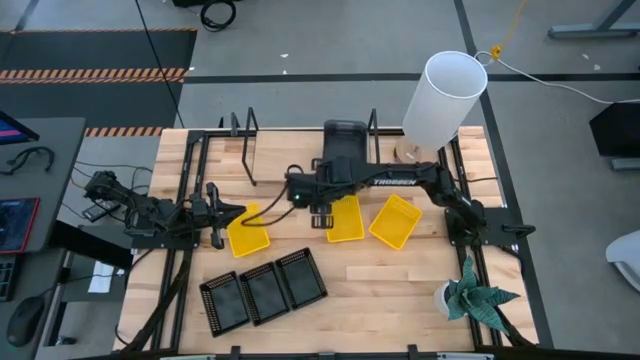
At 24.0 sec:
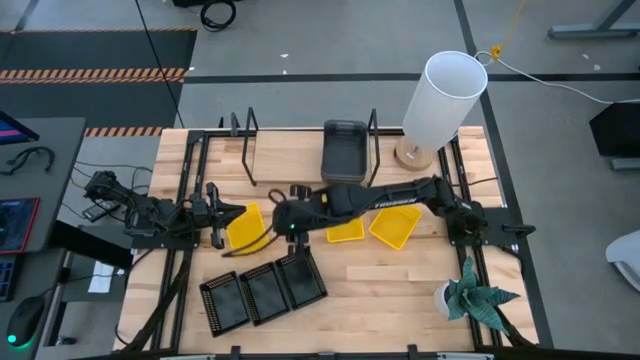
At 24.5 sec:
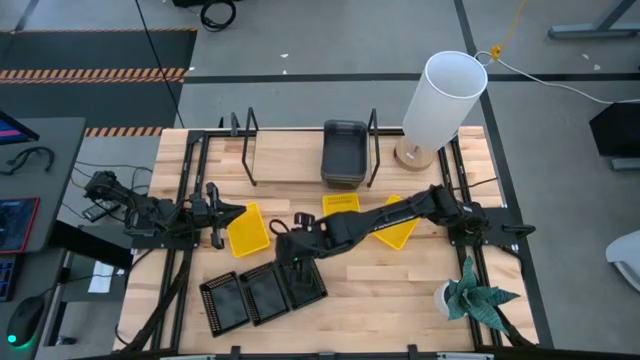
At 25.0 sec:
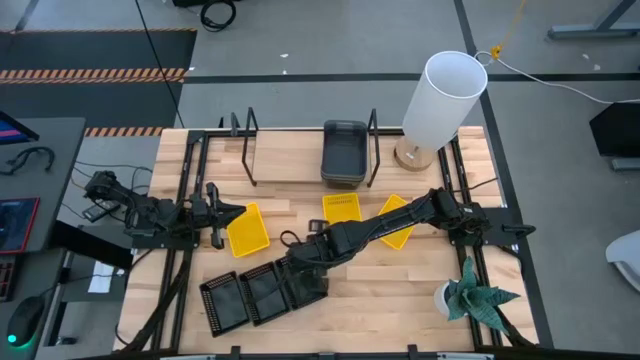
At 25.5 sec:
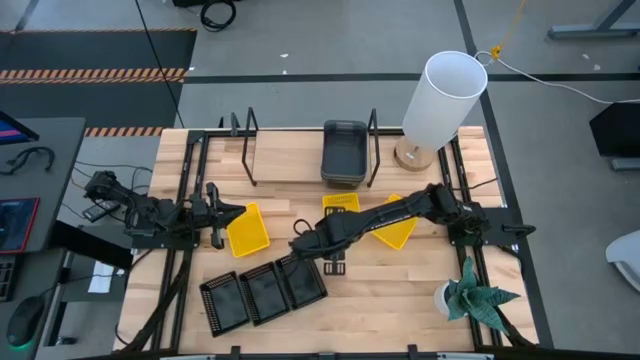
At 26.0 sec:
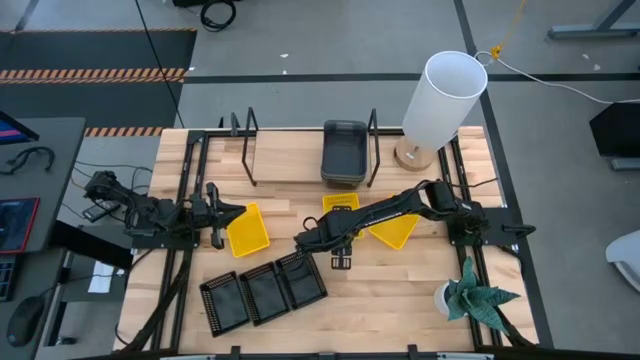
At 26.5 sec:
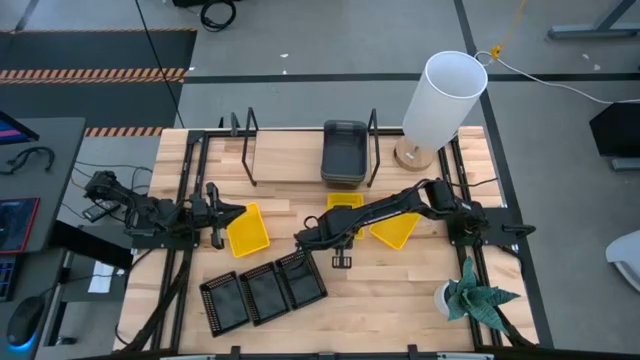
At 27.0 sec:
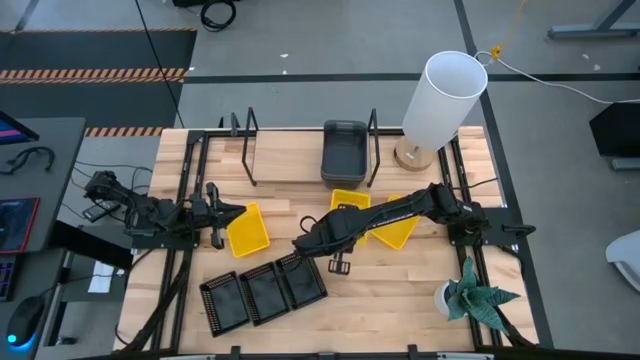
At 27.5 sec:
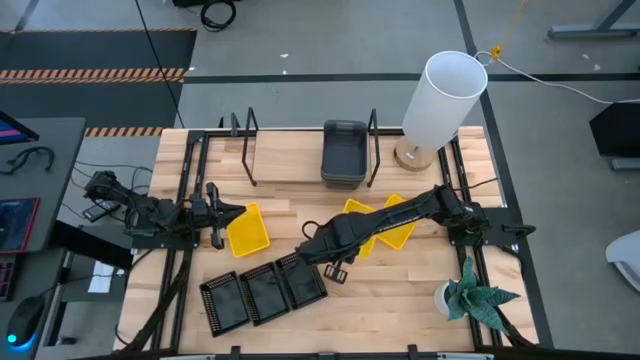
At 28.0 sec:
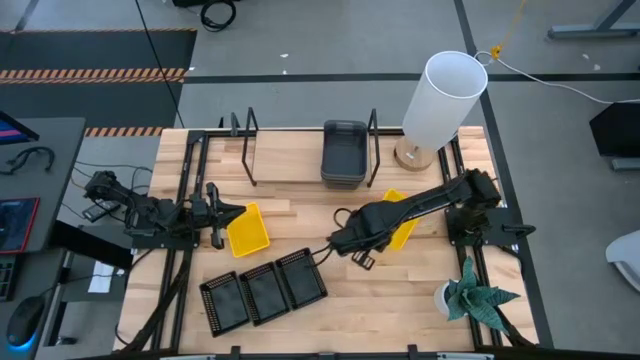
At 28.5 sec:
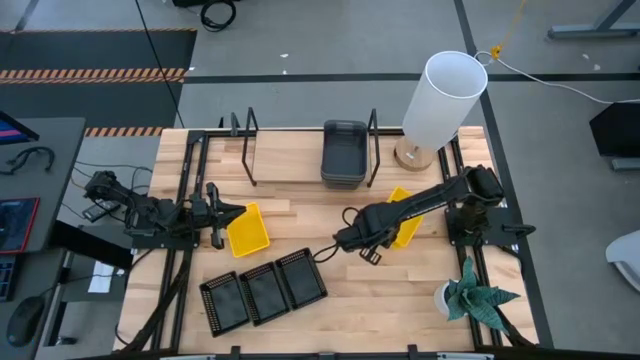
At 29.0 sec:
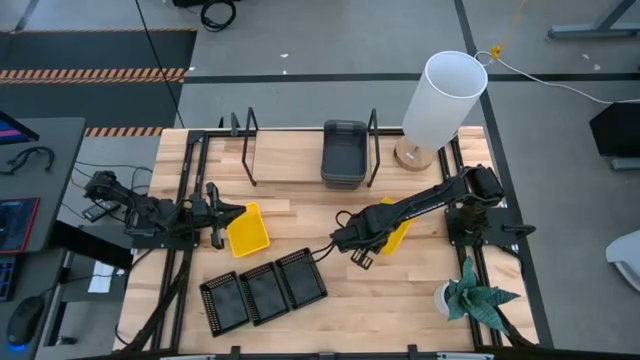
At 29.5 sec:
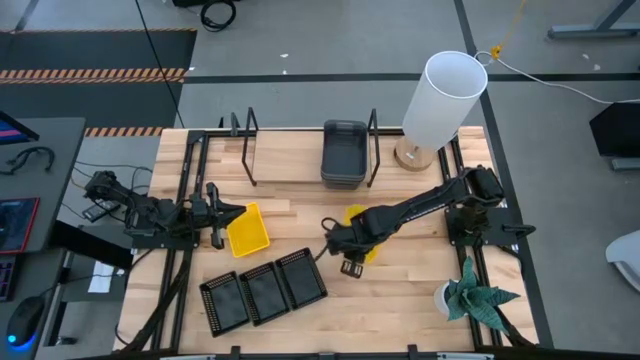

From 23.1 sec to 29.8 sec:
Task: Stack baskets on shelf by color
Stack the center yellow basket on the right yellow basket

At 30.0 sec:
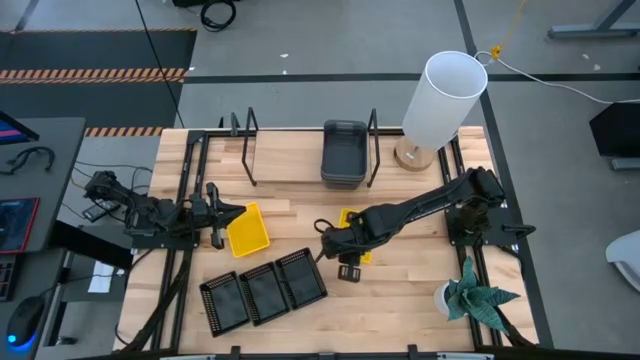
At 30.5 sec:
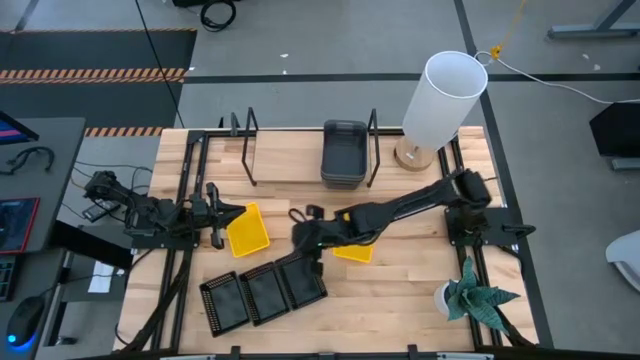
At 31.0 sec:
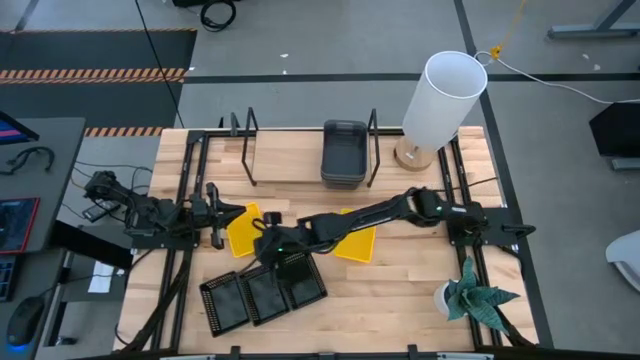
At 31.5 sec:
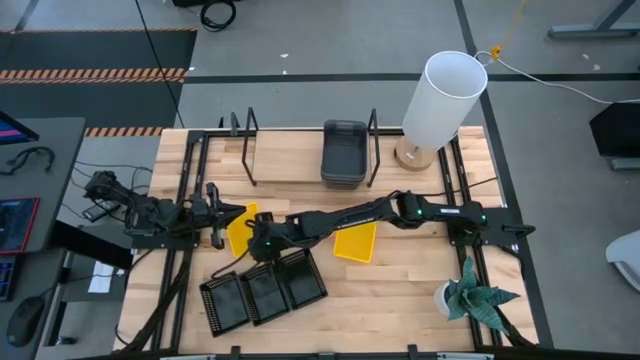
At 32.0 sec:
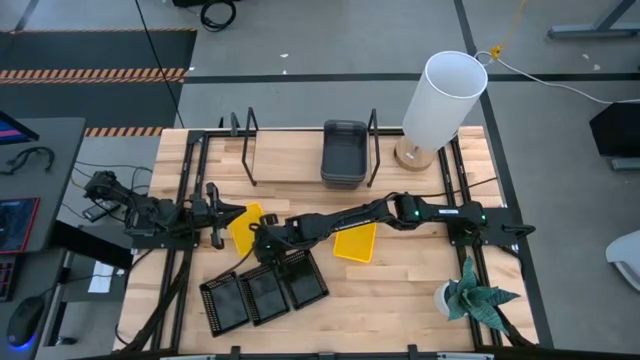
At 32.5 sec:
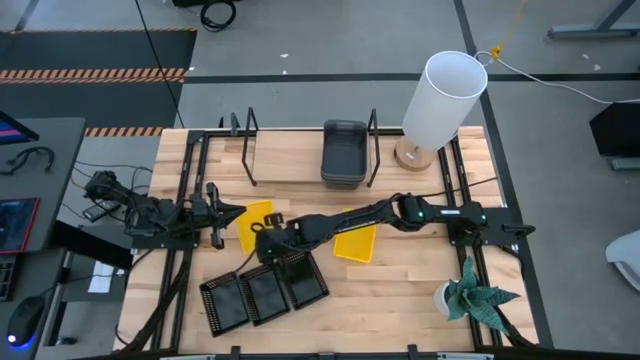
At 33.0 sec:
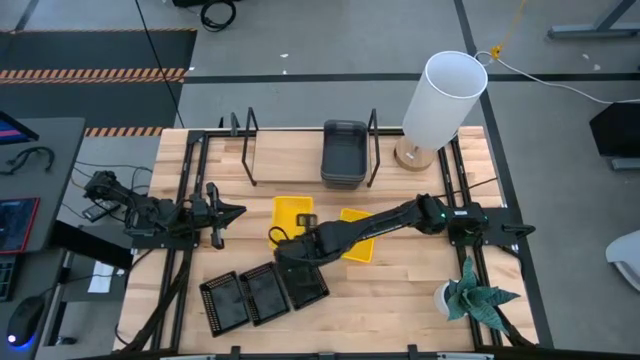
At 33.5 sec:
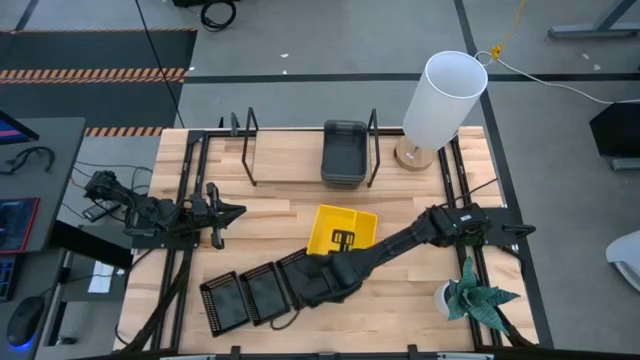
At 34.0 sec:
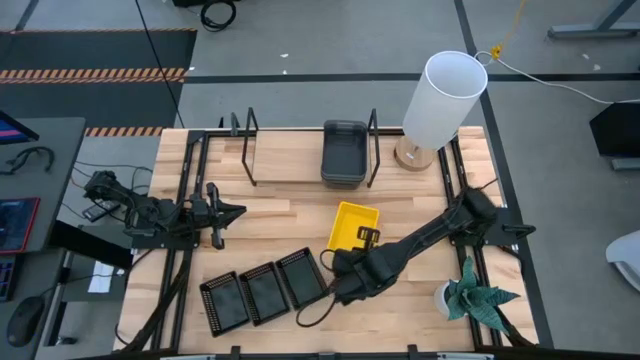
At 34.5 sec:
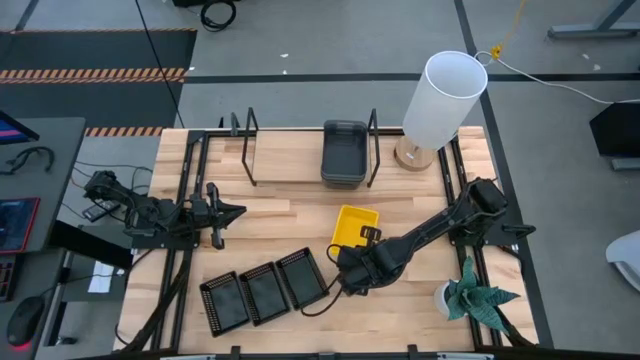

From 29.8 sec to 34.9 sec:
Stack the left yellow basket on the right yellow baskets

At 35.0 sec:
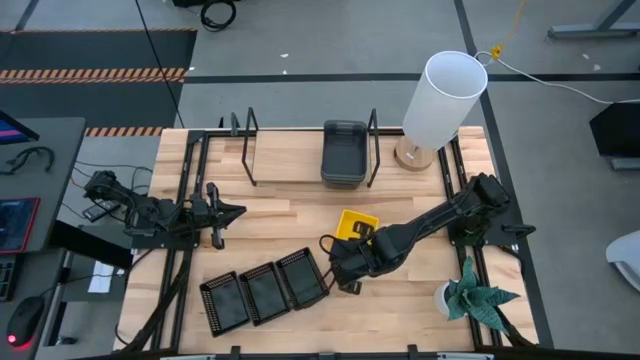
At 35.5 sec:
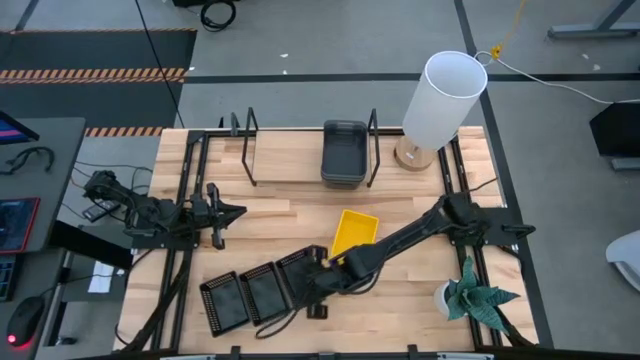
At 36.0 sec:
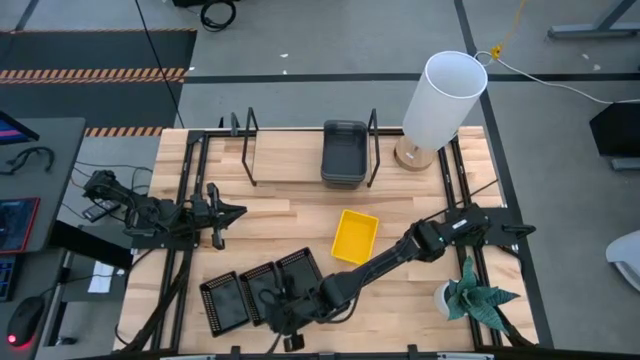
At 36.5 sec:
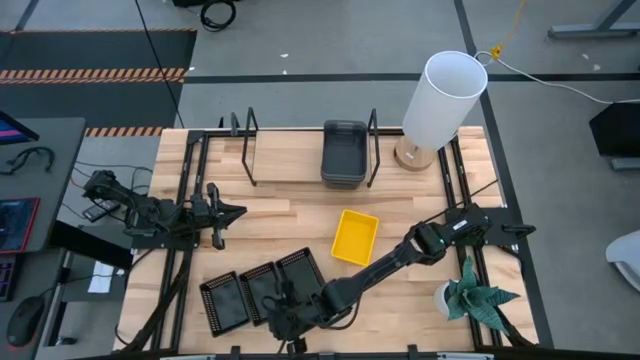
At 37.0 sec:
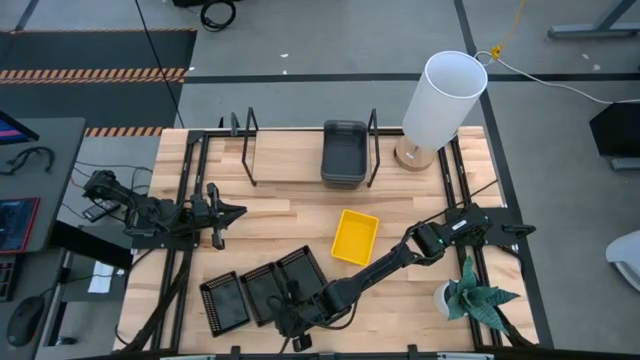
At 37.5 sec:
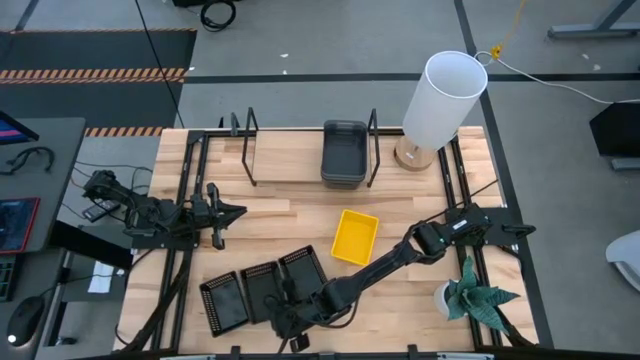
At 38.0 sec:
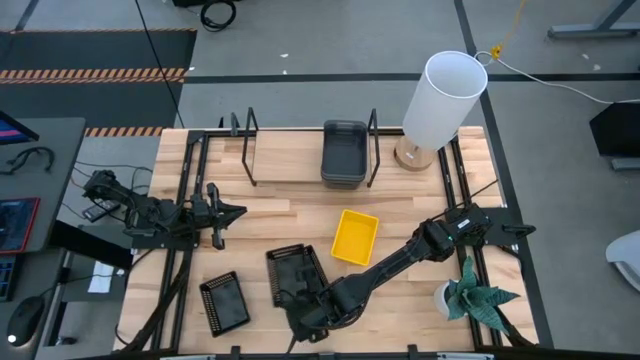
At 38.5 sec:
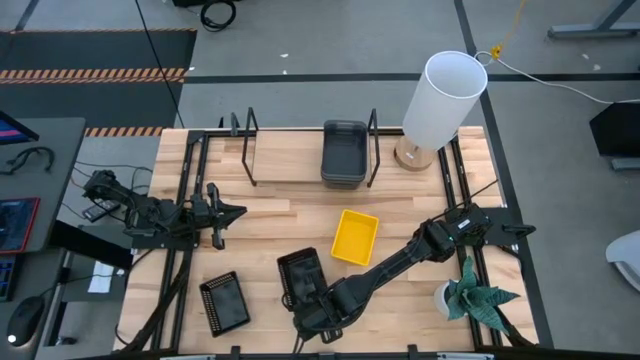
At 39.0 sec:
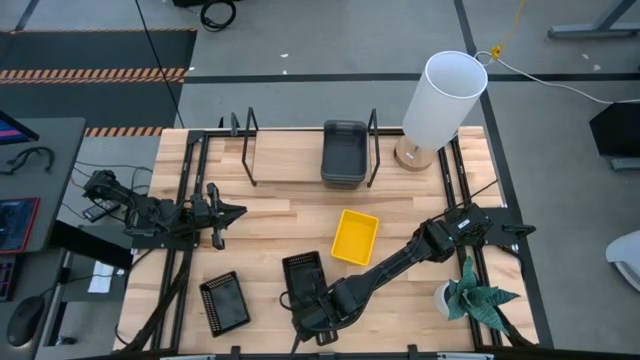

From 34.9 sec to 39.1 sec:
Stack the middle black basket on the right black basket

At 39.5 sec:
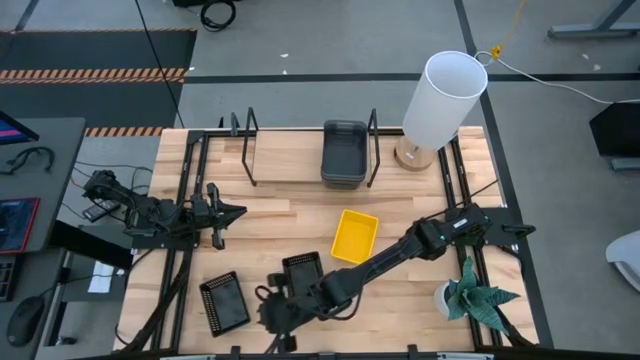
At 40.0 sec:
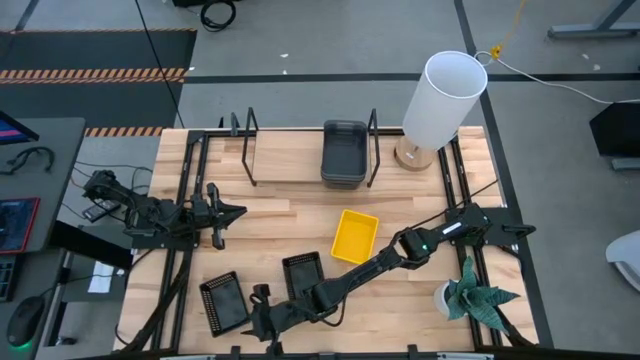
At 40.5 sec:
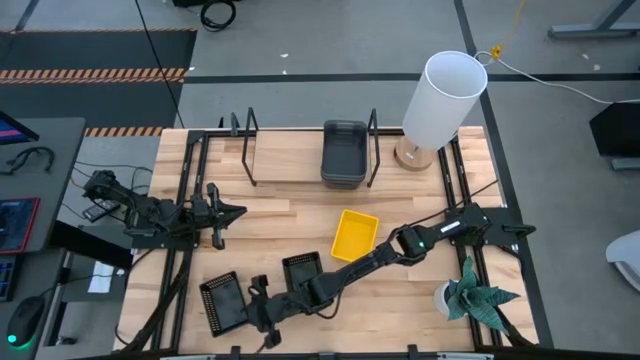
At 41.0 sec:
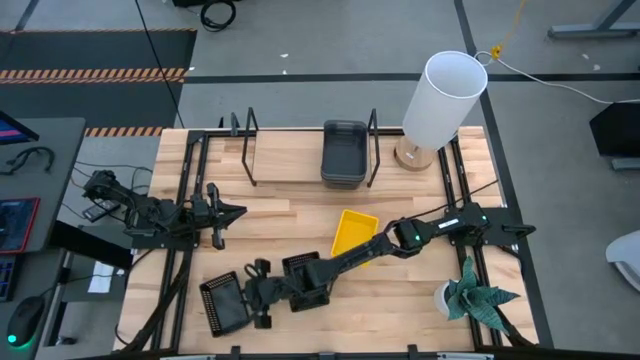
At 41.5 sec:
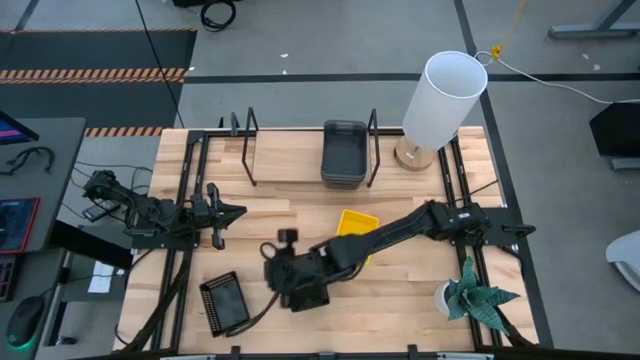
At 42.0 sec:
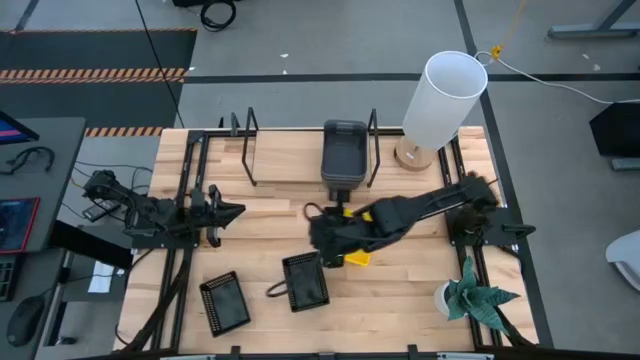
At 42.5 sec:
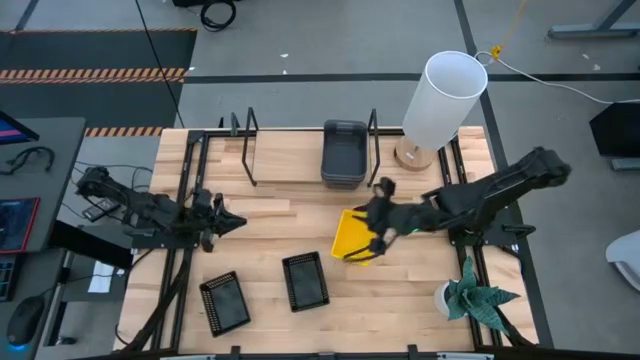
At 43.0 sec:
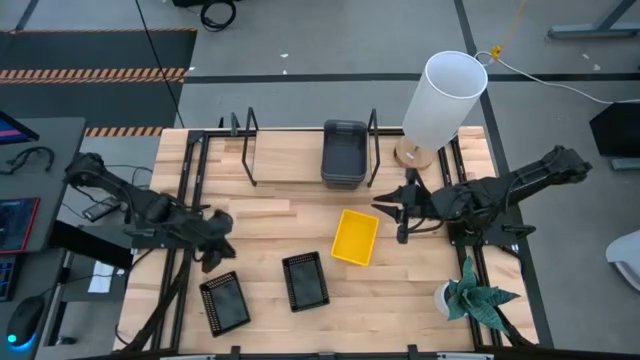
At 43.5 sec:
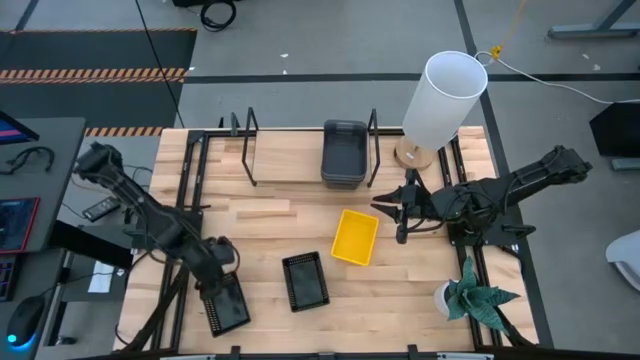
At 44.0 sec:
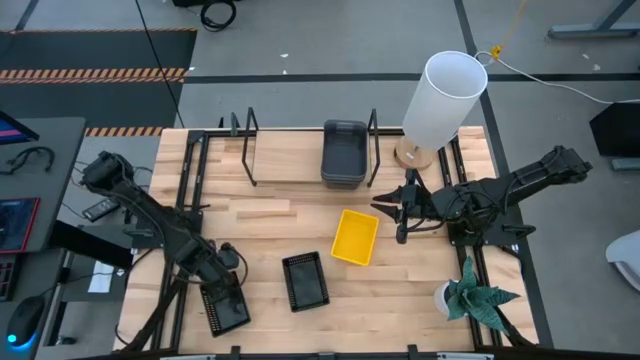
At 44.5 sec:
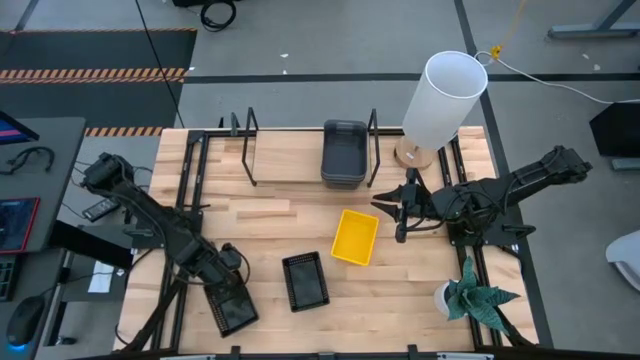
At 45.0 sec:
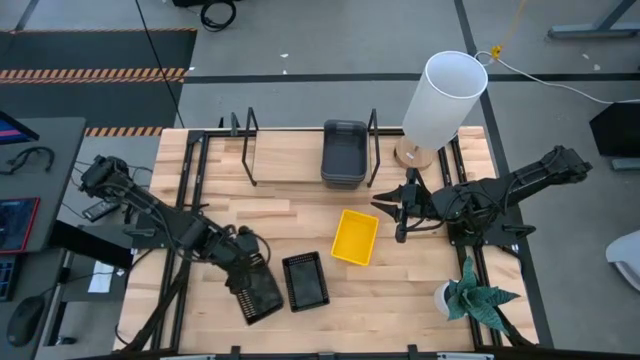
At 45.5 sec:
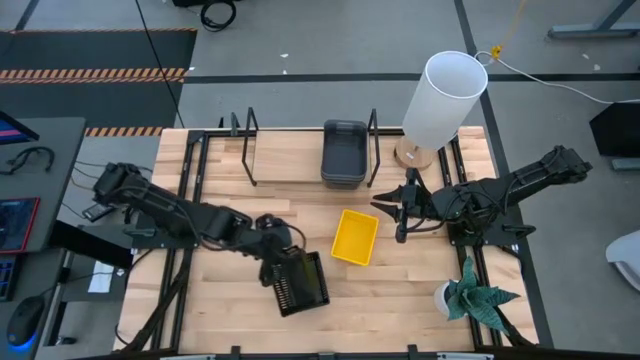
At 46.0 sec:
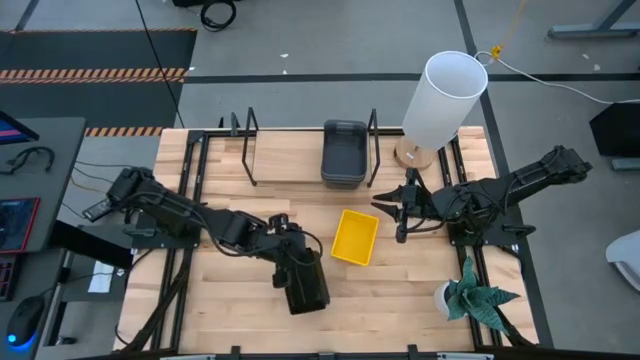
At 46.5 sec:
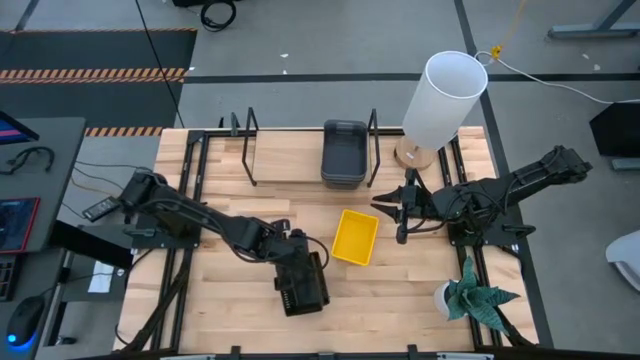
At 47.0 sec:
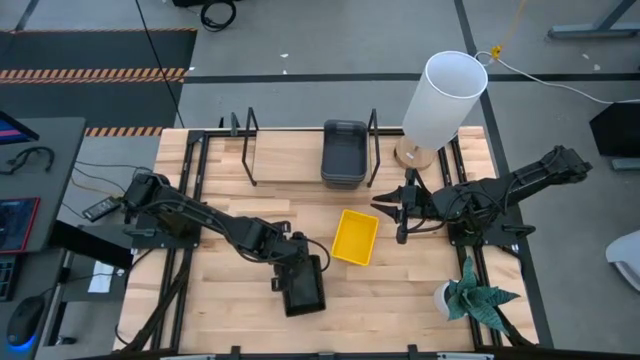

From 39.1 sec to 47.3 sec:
Stack the left black basket on the right black baskets
